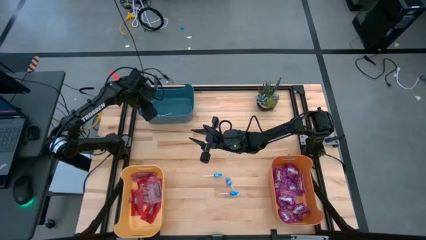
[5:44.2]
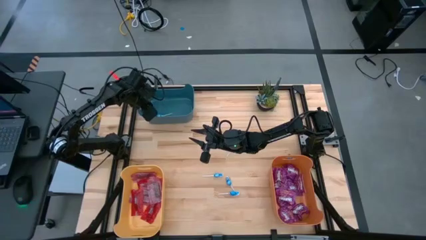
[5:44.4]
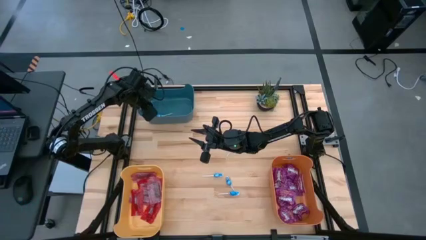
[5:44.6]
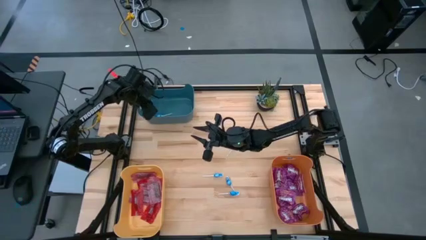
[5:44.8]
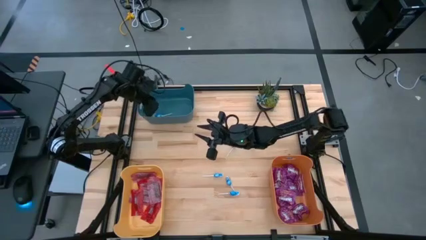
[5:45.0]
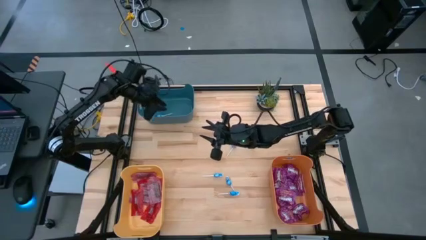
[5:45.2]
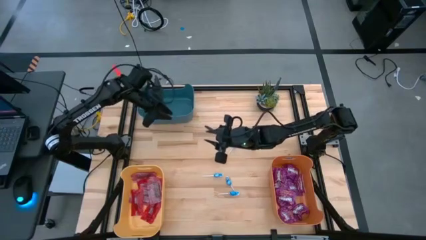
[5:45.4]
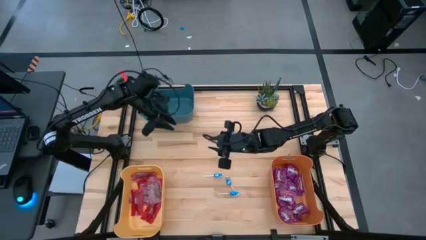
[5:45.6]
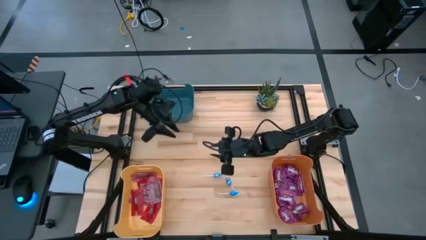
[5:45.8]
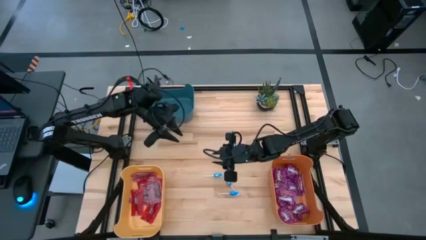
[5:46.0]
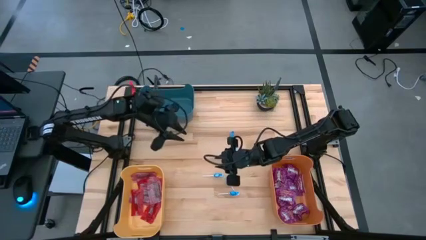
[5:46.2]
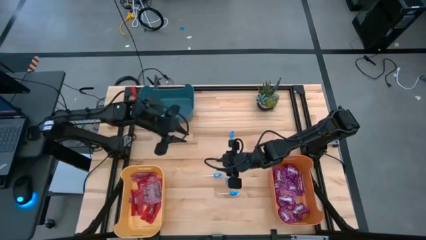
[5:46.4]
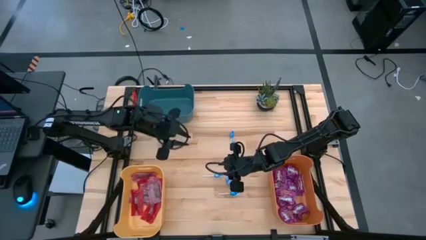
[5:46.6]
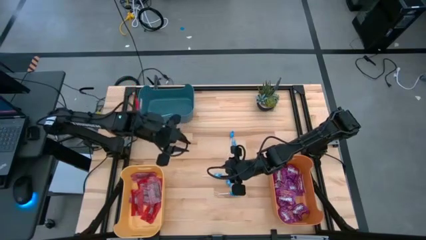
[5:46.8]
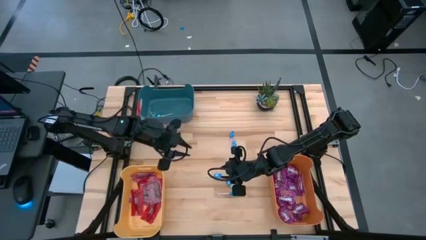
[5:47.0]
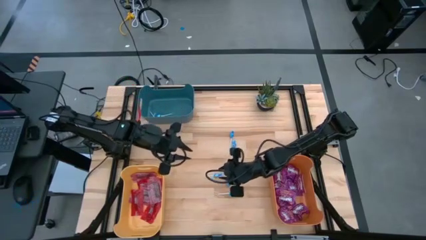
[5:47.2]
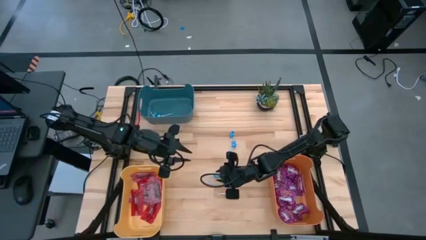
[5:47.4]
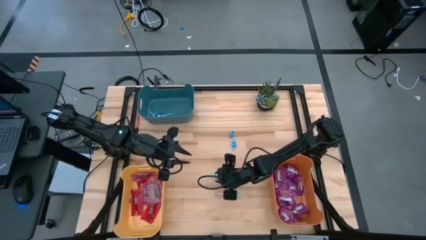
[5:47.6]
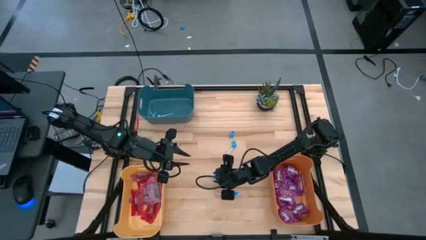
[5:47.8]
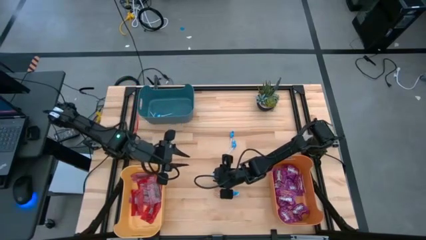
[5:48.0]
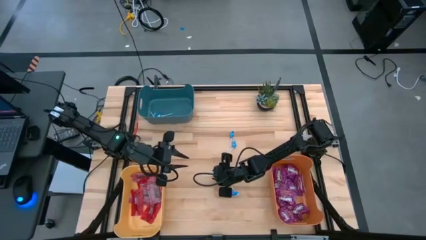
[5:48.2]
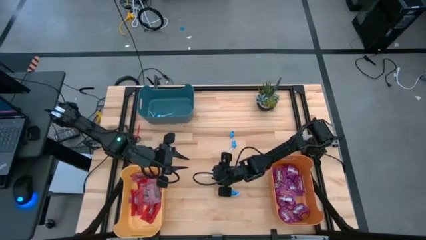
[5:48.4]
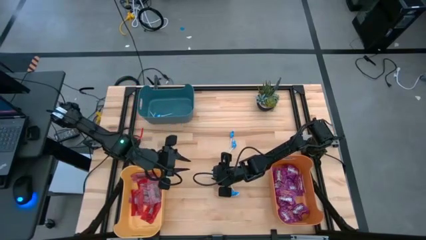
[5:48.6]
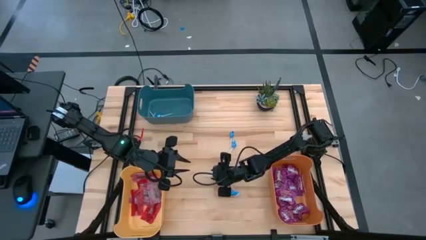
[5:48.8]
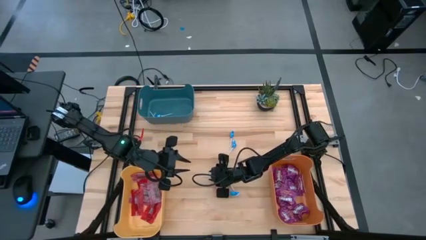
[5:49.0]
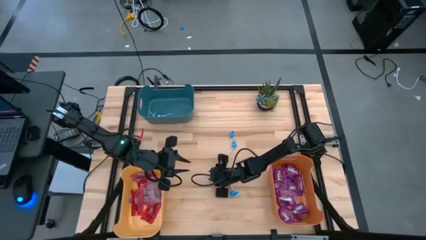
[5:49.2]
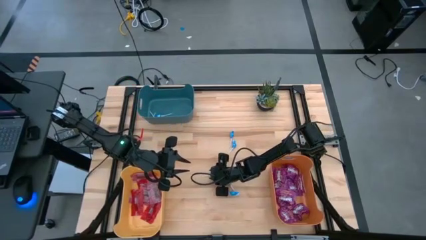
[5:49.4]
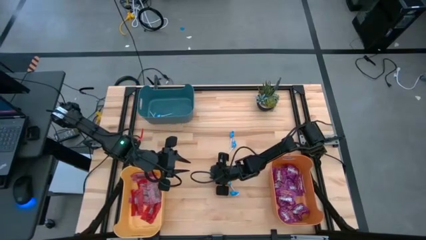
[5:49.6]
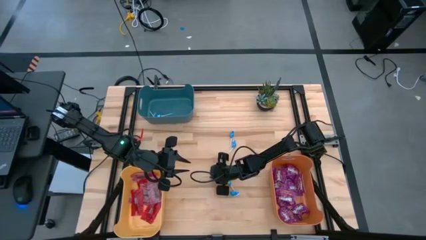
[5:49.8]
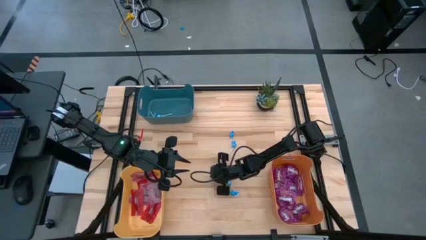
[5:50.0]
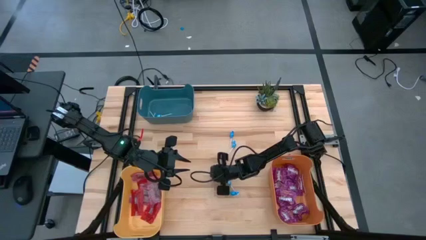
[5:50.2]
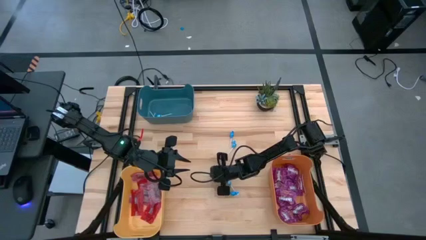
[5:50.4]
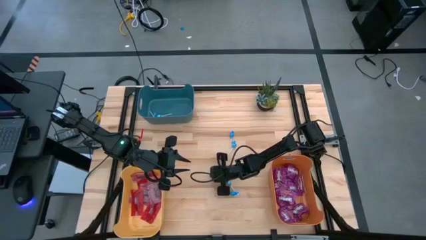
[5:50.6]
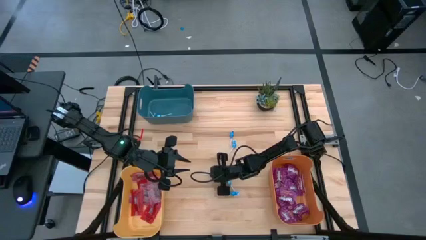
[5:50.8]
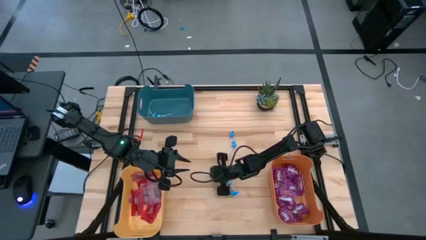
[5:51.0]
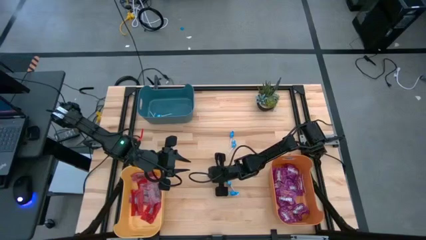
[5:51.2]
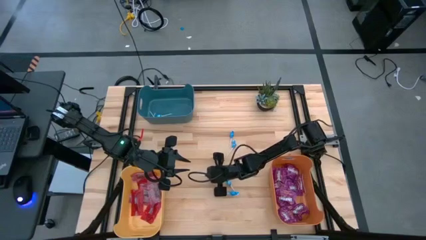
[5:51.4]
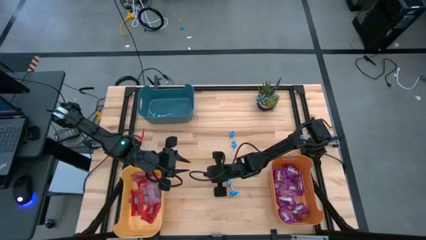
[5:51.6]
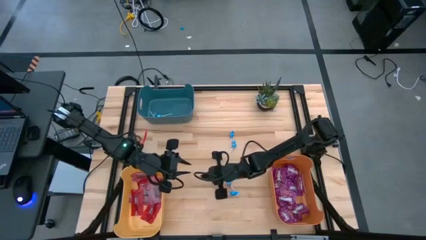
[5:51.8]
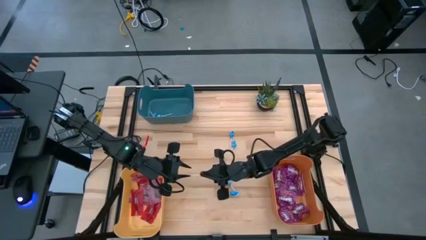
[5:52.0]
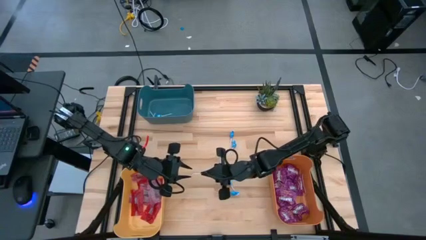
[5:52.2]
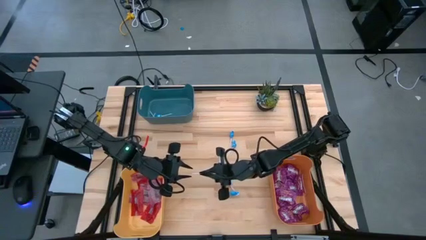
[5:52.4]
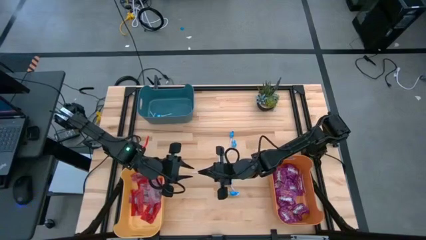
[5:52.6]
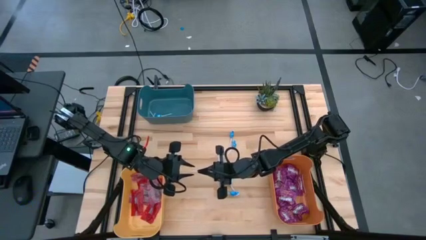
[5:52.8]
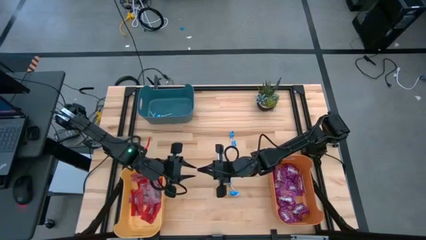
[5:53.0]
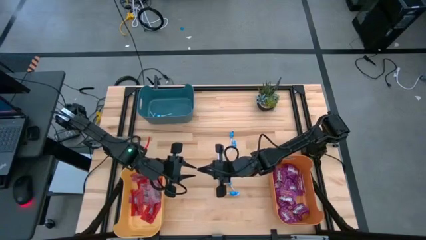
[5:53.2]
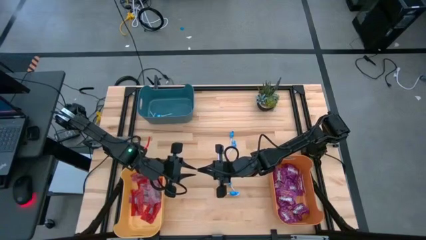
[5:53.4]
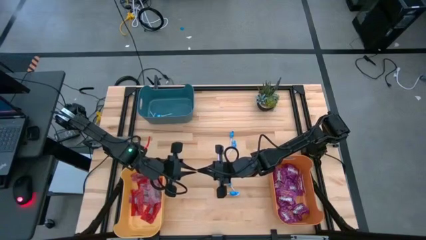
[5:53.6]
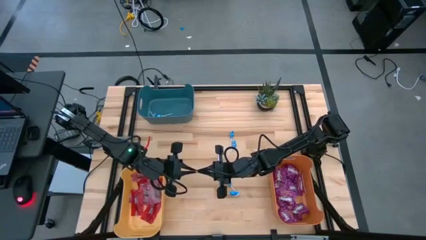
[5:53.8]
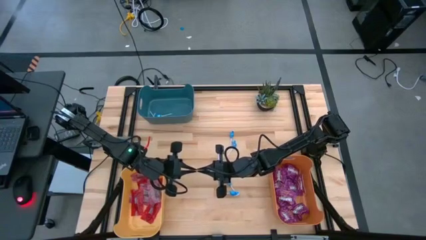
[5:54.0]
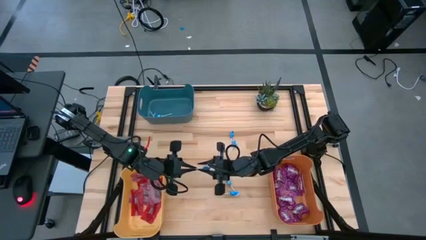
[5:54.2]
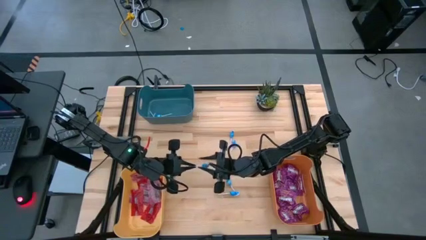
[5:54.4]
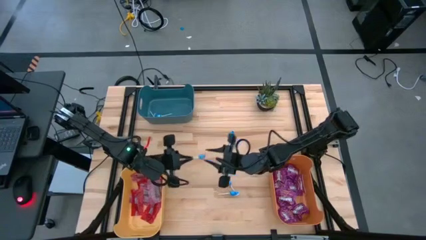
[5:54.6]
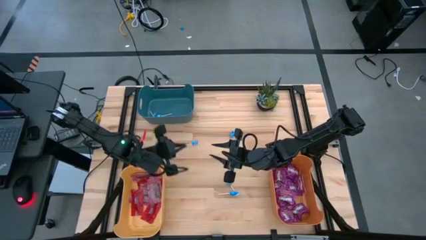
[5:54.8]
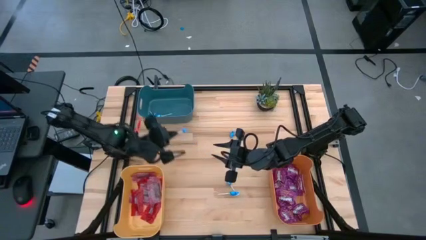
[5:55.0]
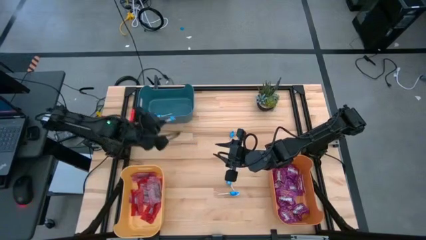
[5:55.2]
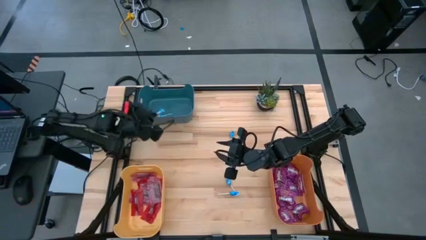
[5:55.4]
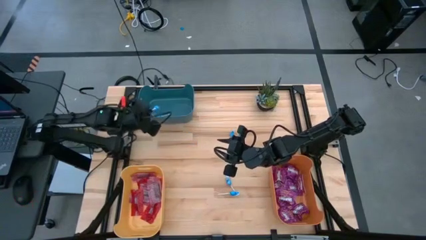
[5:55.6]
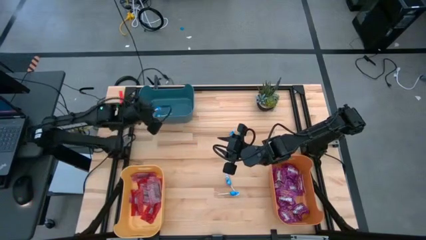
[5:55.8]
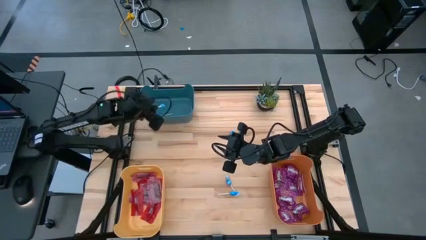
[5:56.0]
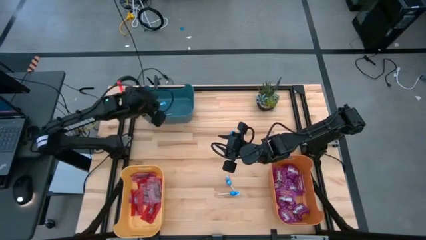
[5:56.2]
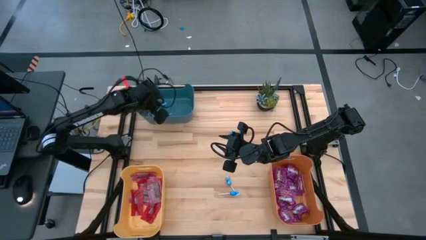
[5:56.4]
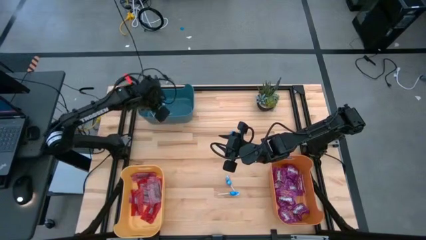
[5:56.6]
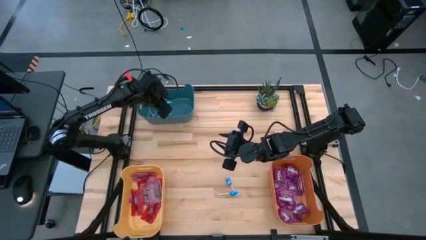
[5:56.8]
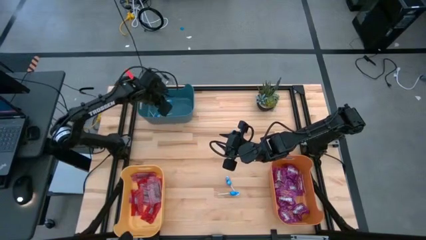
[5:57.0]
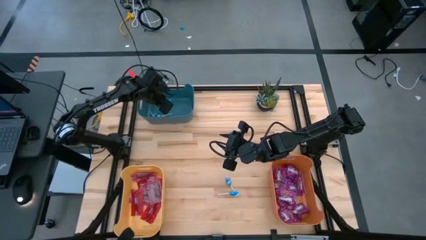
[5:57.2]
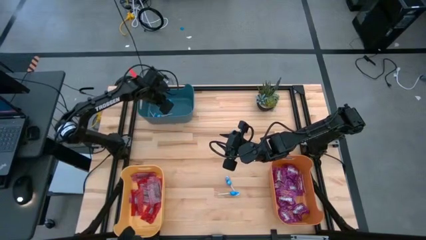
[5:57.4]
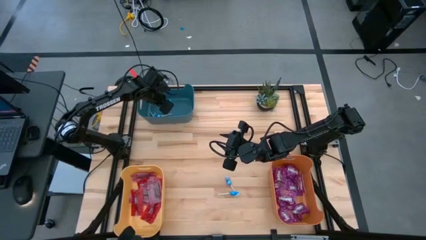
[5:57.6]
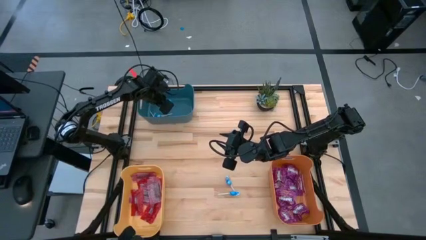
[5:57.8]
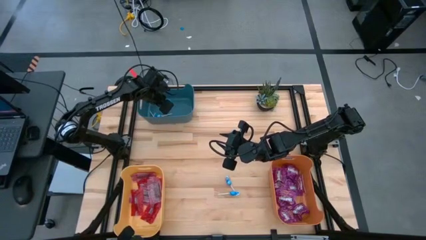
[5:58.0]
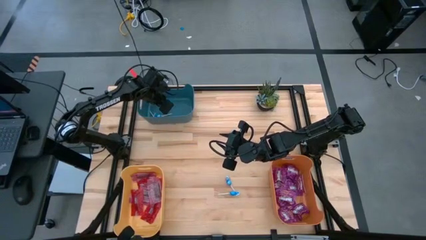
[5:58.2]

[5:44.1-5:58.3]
Task: Sort candy
Put the blue candy into the blue bin

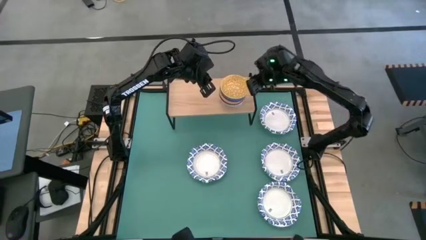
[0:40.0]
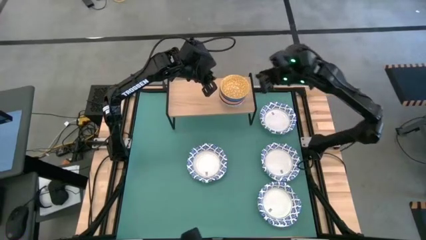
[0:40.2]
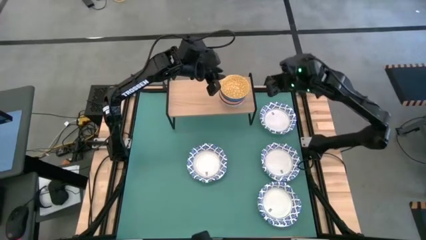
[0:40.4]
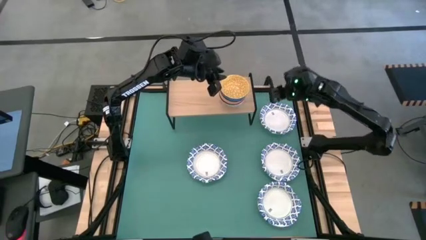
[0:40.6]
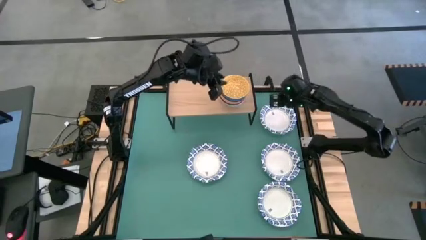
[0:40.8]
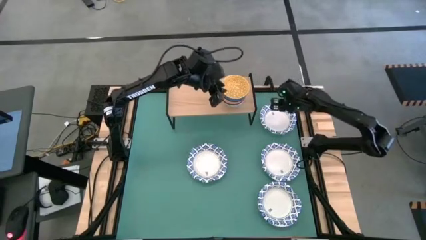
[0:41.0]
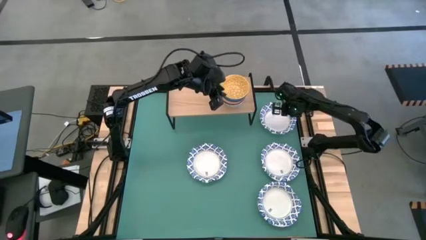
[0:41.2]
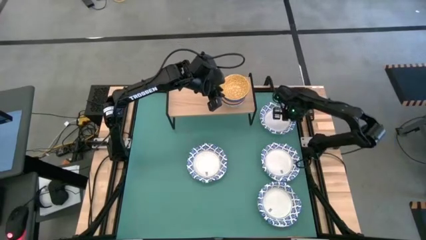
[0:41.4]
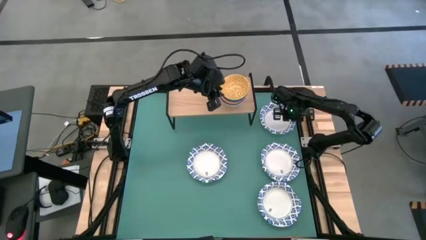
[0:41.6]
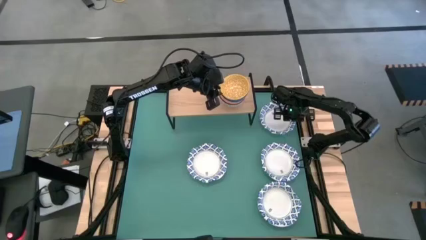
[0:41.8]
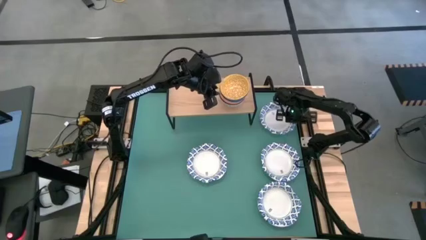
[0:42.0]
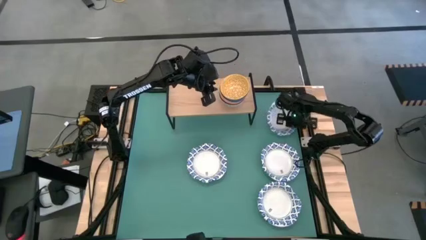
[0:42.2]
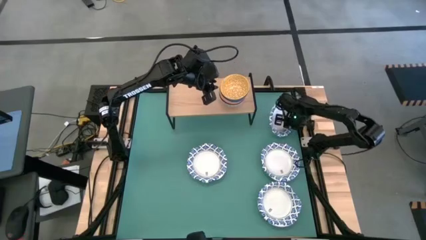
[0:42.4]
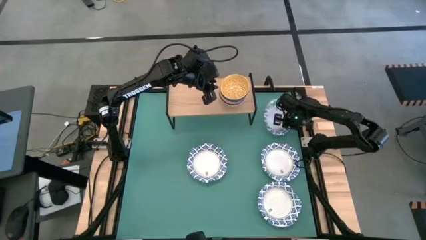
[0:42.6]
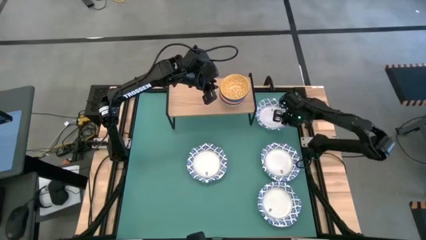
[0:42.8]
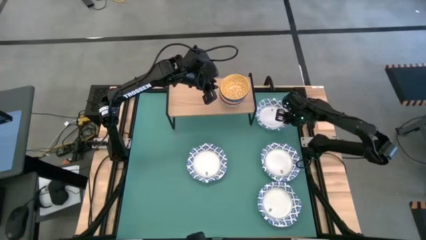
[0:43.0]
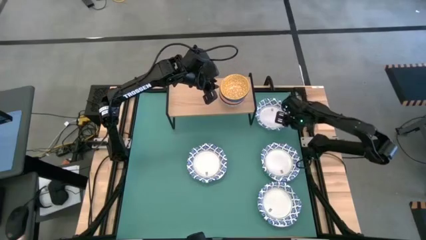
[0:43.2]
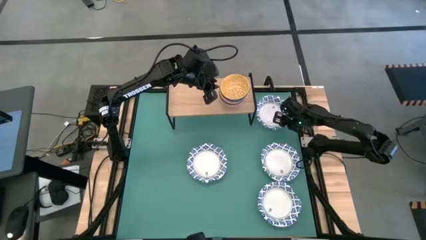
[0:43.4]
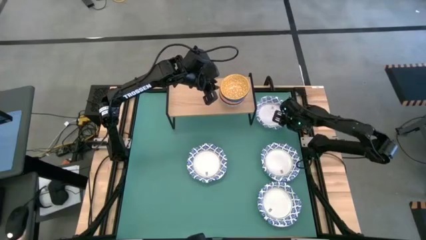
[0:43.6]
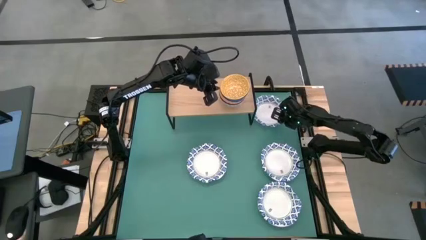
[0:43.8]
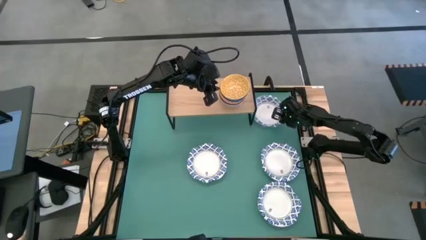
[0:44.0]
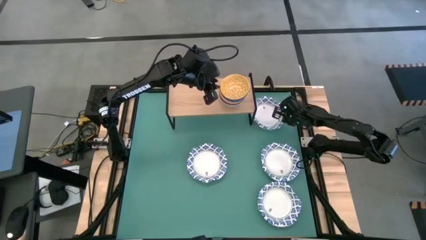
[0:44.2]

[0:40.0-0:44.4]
Task: Place and stack bowls onto a shelf
Put the white bowl on the shelf
